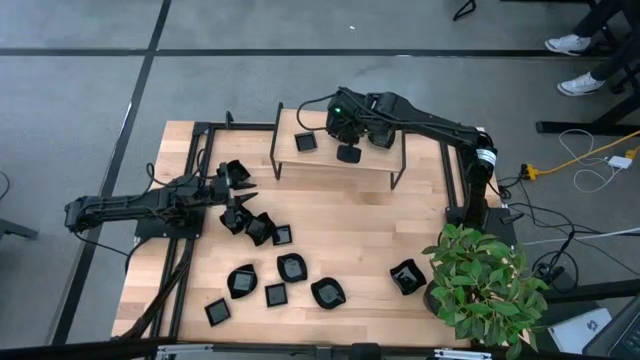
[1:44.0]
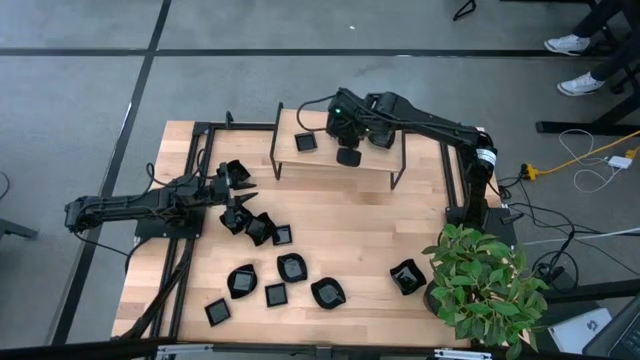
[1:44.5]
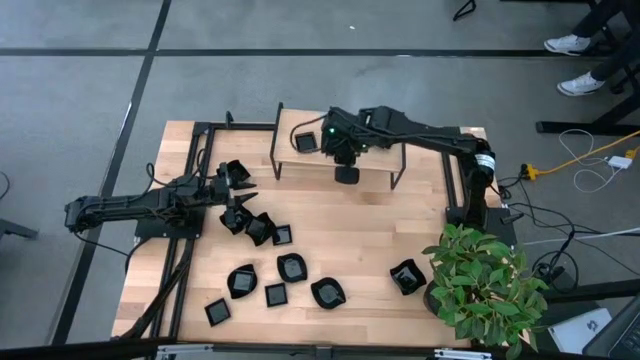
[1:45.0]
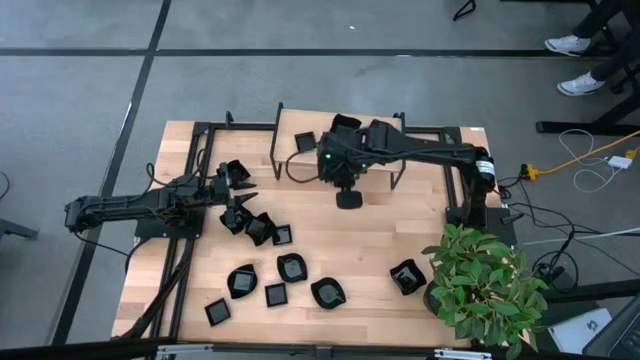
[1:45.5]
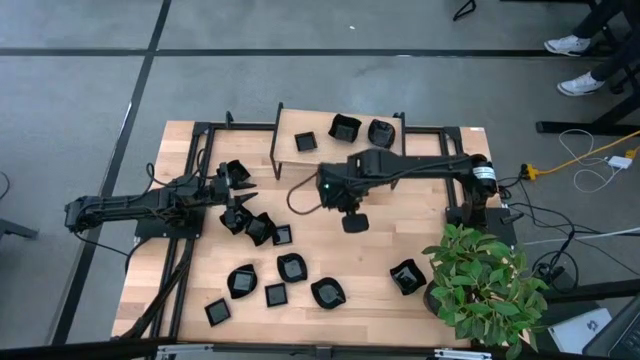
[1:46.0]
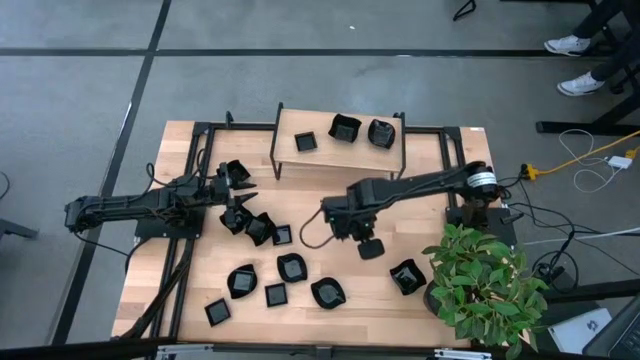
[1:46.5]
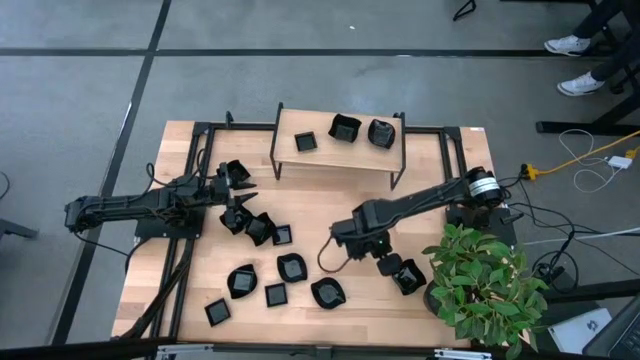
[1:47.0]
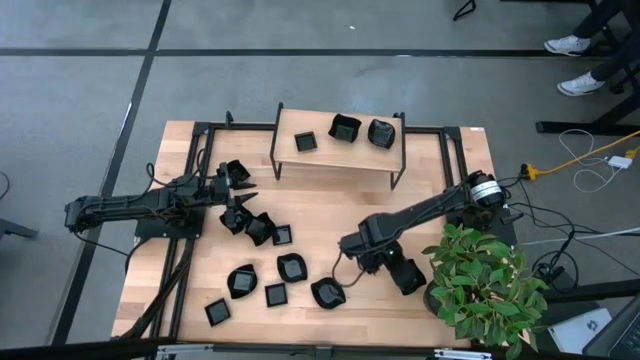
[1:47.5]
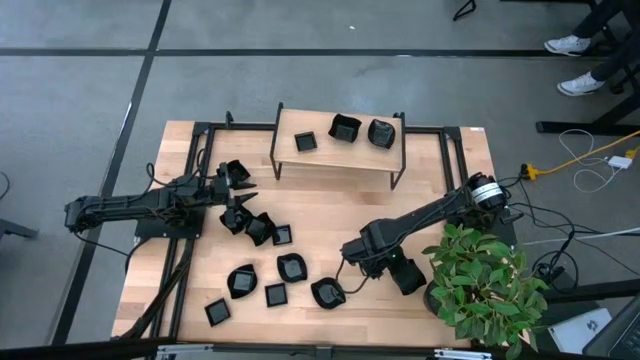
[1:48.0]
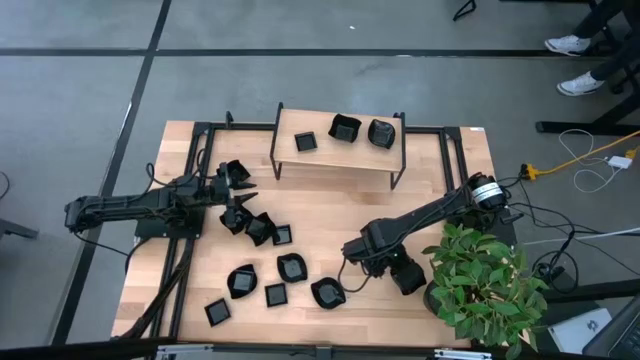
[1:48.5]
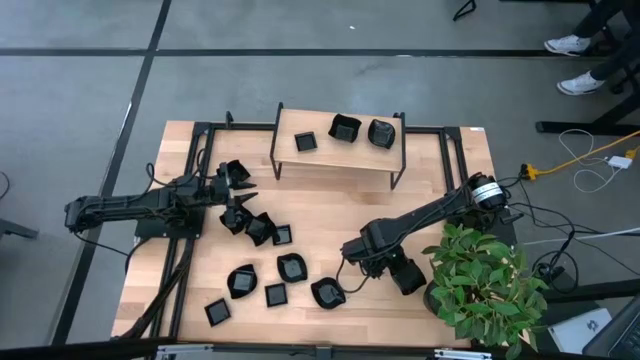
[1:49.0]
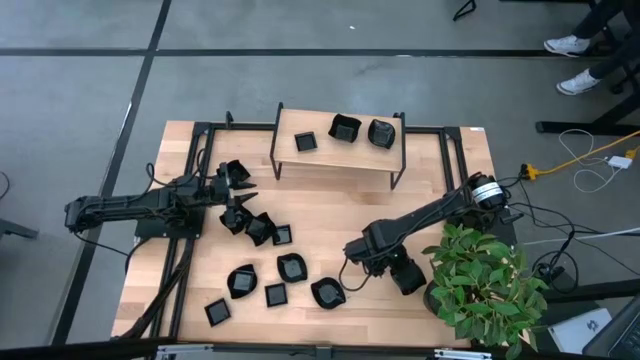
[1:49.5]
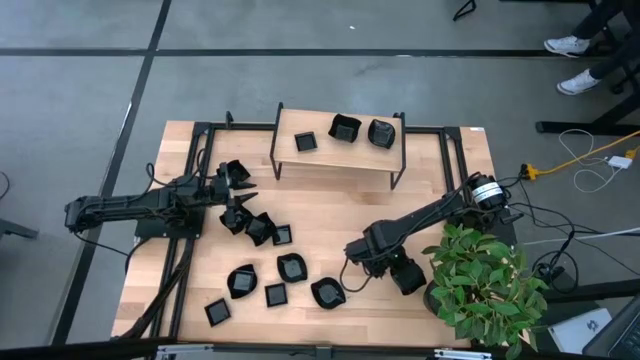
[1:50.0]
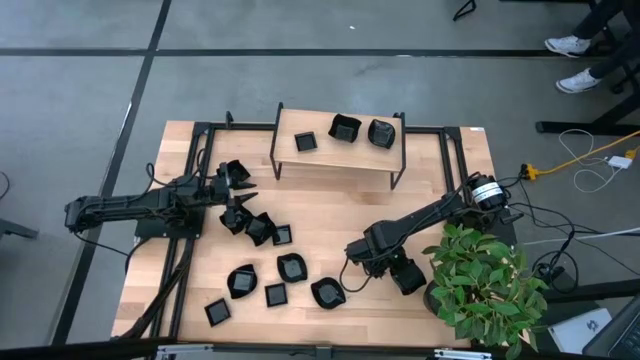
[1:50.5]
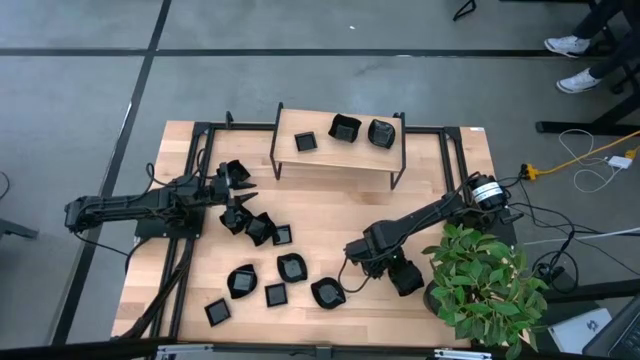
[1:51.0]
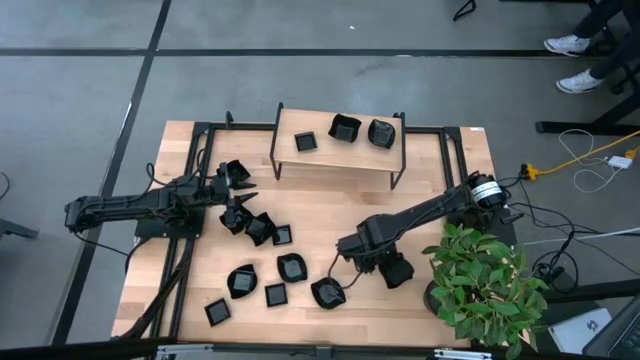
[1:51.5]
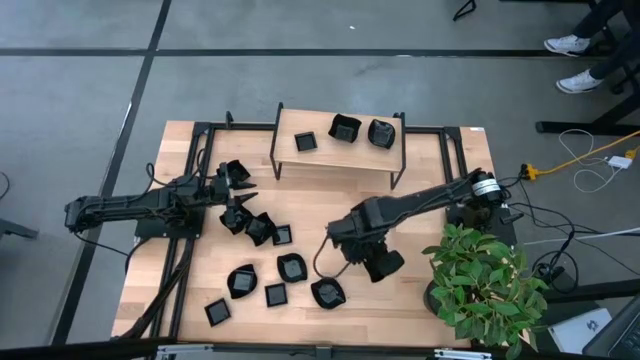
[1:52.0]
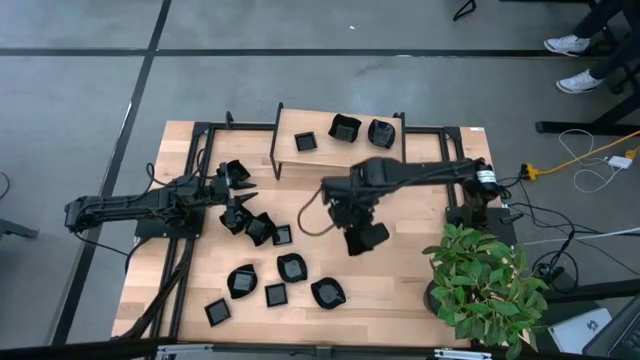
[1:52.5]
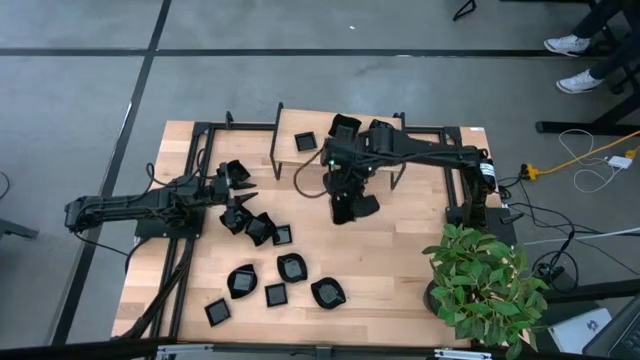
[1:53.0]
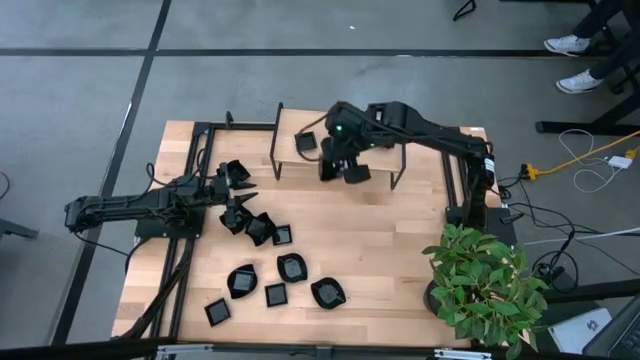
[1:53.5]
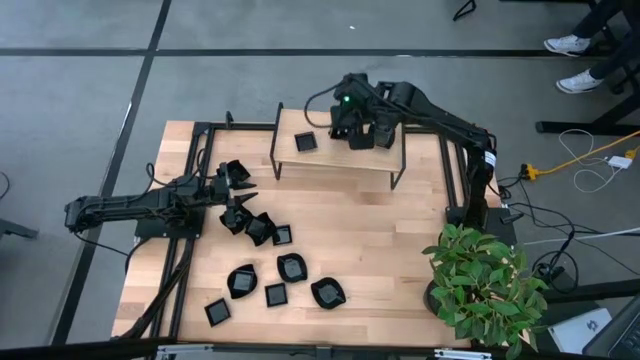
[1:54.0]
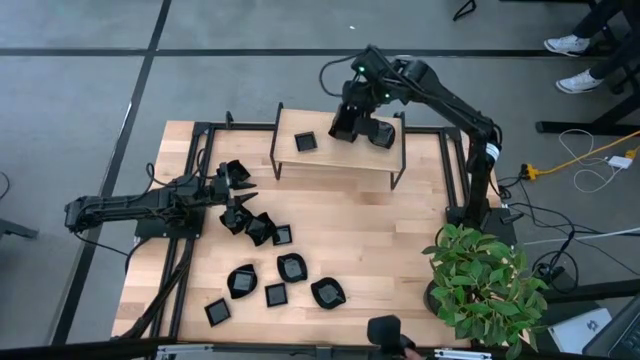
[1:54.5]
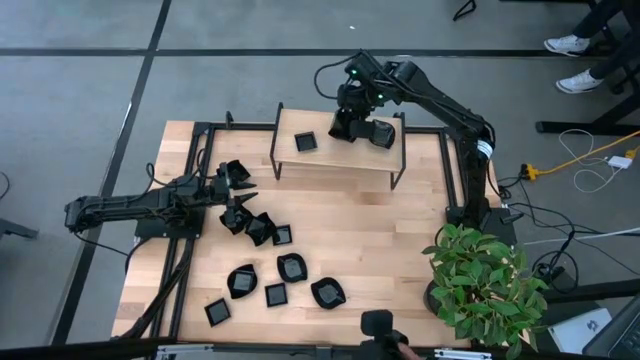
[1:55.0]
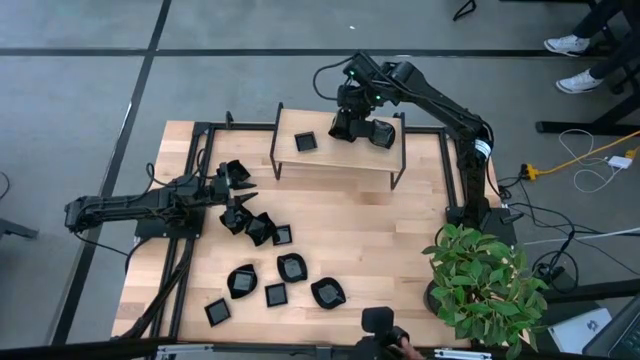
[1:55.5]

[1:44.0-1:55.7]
Task: Pick & Place Mini shaped plates
Stack the distorted square plate on top of the distorted square plate on the shelf

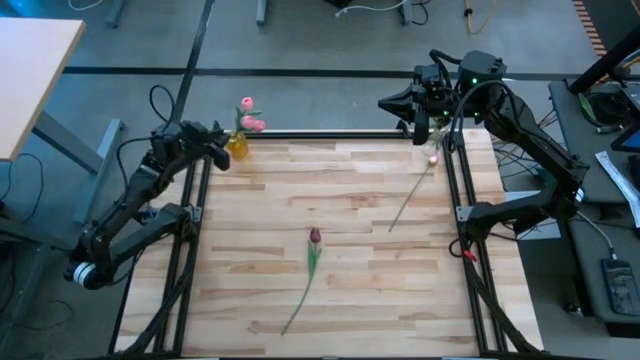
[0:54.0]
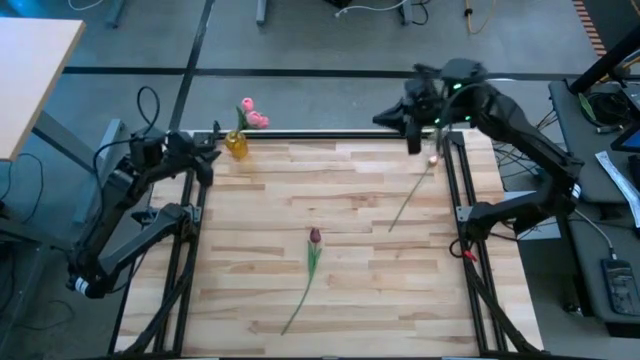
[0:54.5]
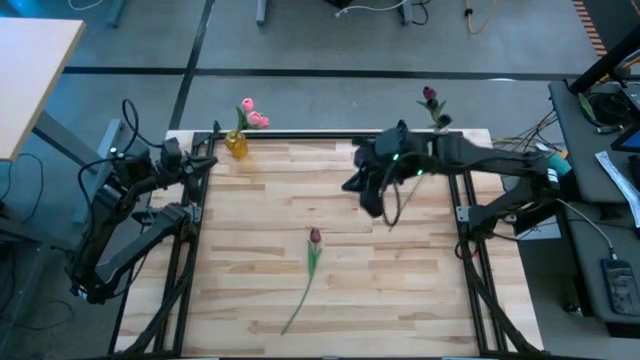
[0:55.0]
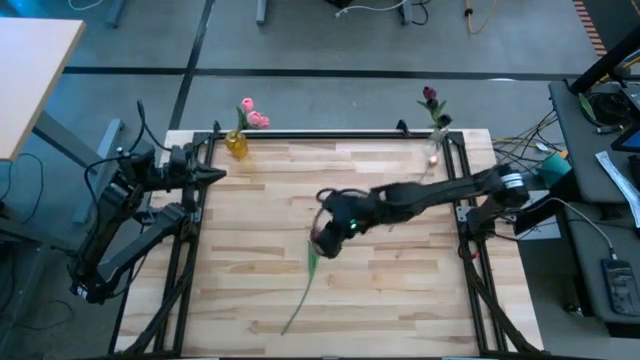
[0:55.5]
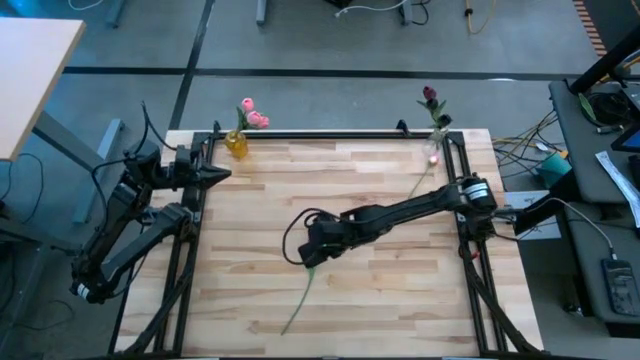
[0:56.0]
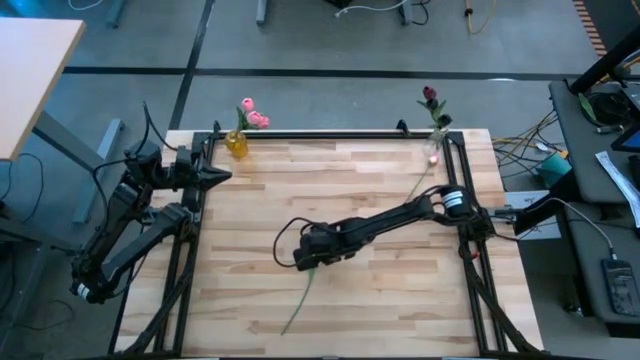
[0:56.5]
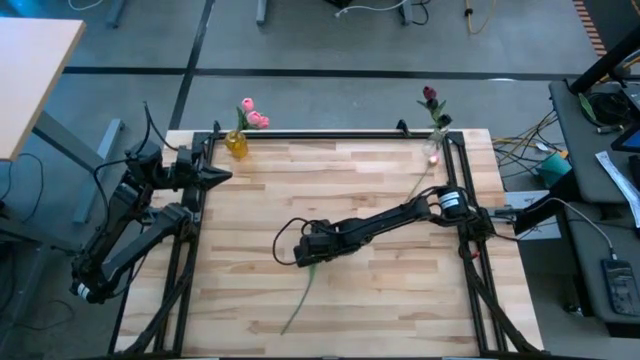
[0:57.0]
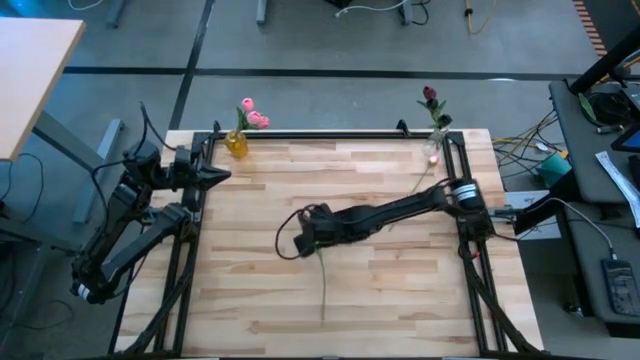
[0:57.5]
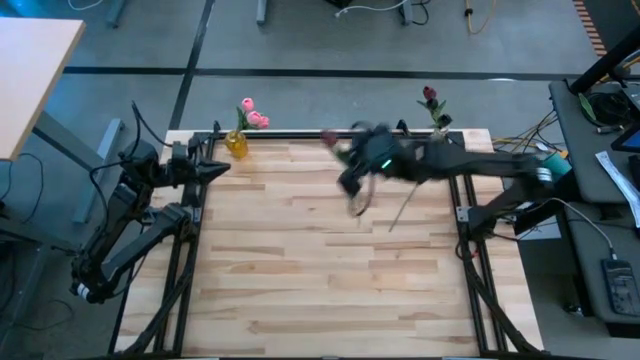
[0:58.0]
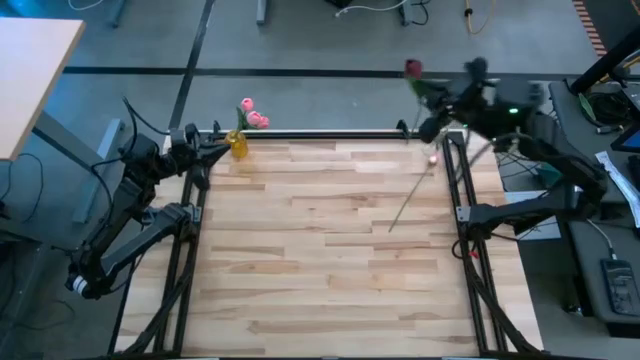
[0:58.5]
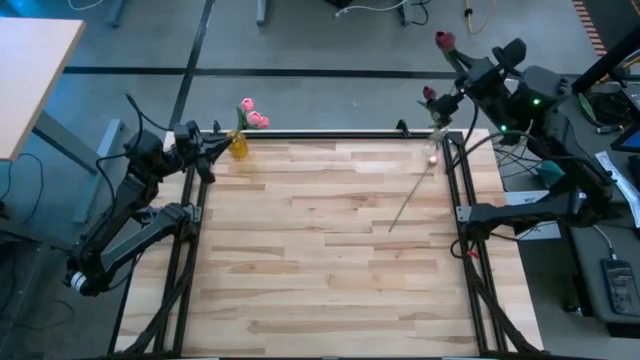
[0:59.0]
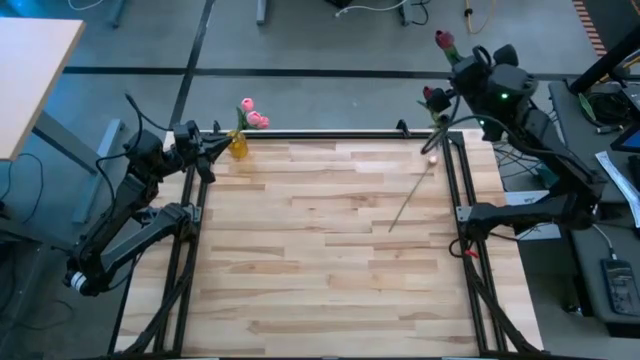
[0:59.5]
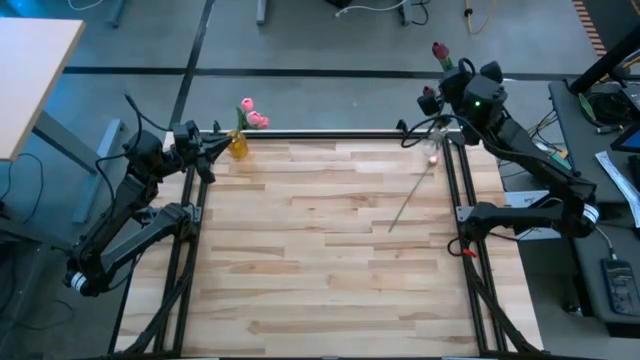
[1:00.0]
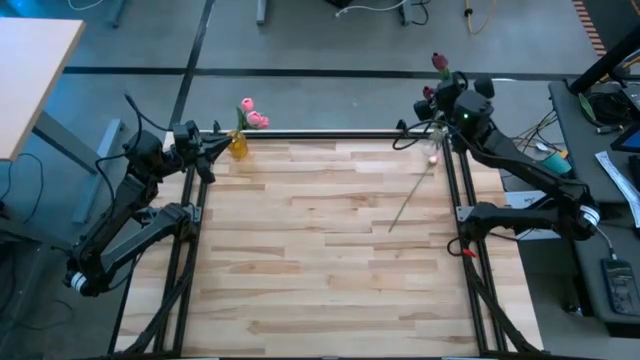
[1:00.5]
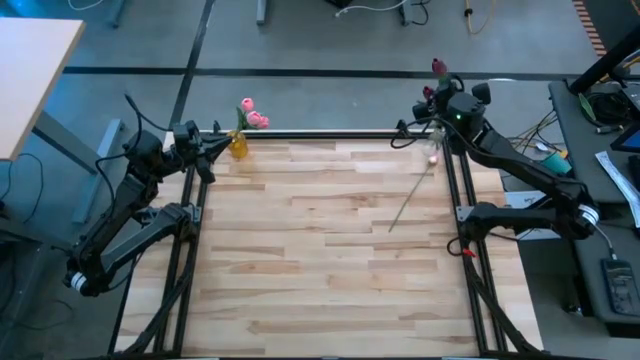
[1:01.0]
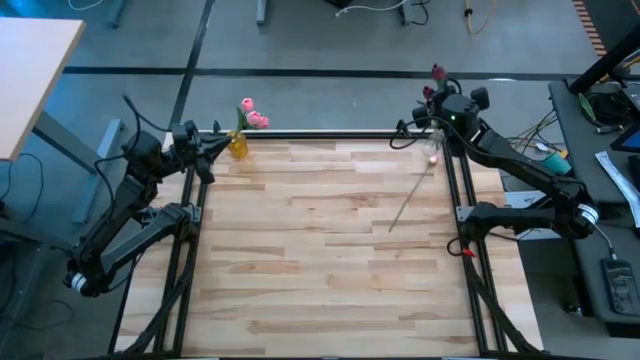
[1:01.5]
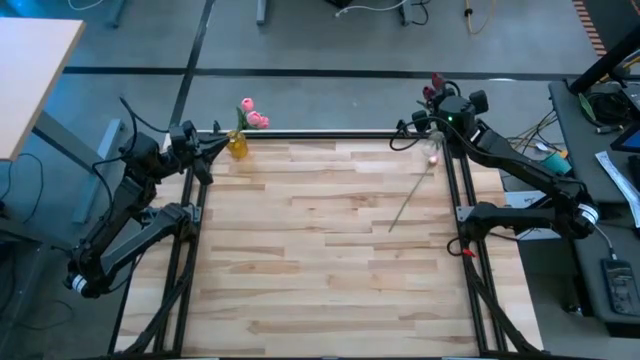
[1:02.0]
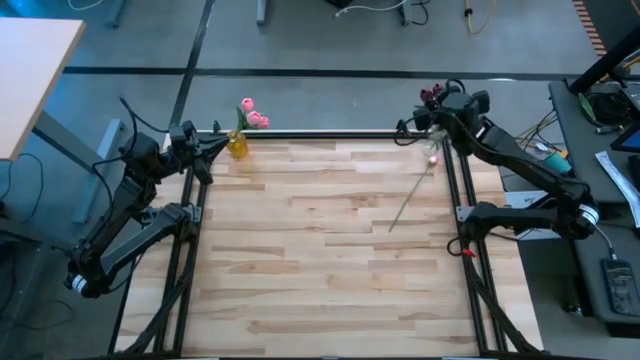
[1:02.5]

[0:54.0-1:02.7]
Task: Sort flowers into vase by color
Put the dark red tulip into the transparent vase
